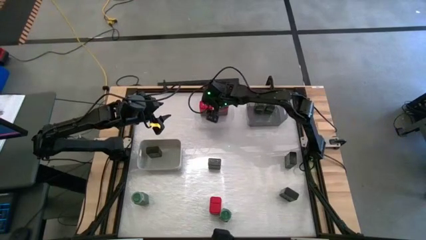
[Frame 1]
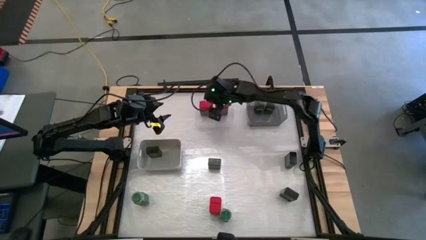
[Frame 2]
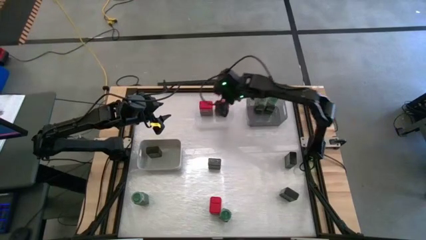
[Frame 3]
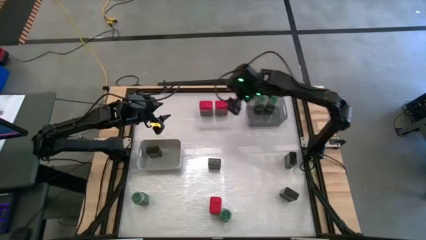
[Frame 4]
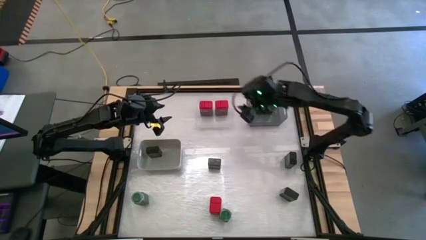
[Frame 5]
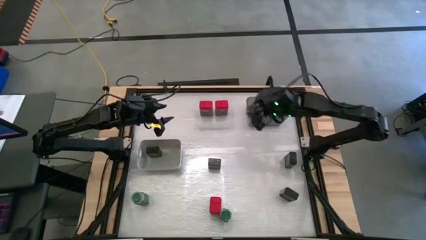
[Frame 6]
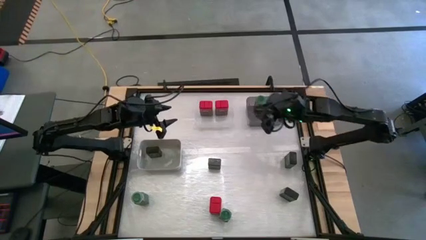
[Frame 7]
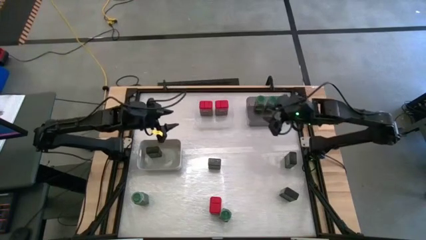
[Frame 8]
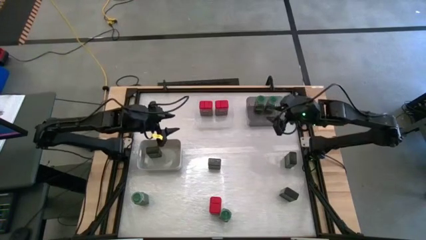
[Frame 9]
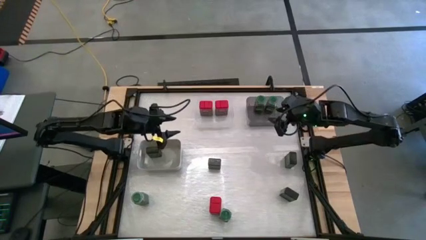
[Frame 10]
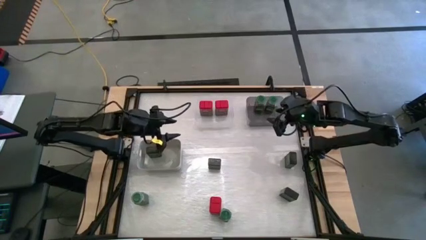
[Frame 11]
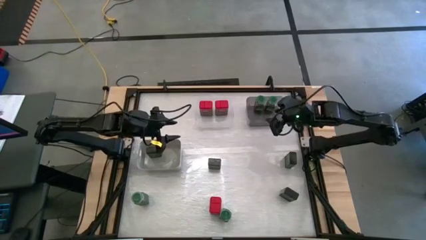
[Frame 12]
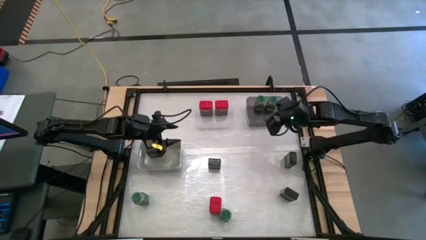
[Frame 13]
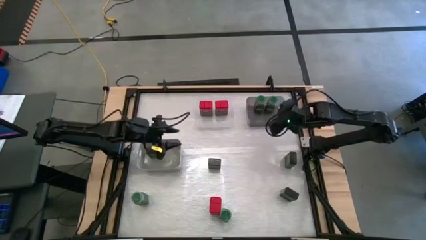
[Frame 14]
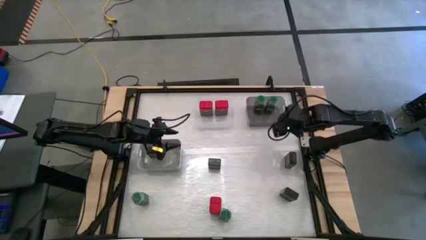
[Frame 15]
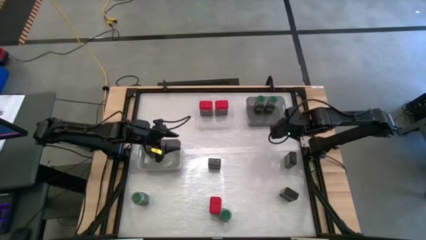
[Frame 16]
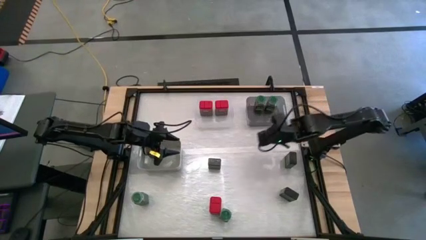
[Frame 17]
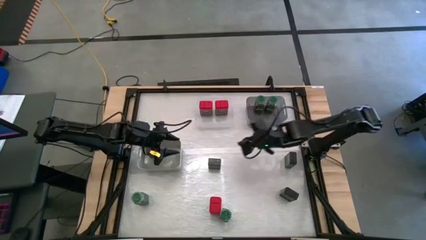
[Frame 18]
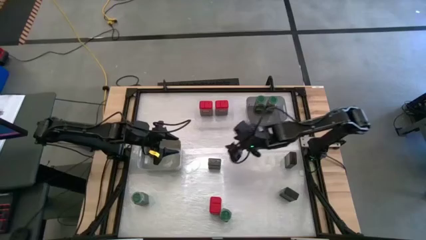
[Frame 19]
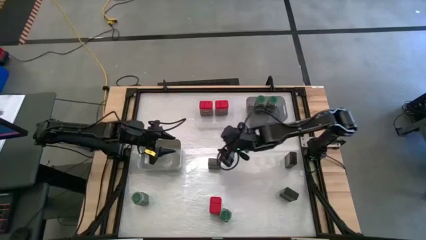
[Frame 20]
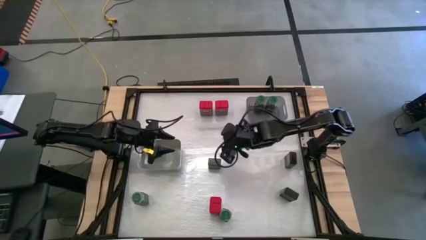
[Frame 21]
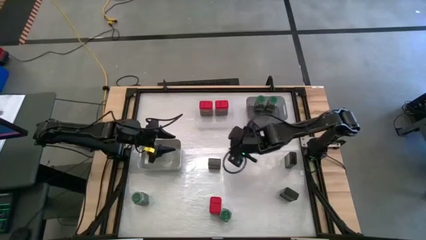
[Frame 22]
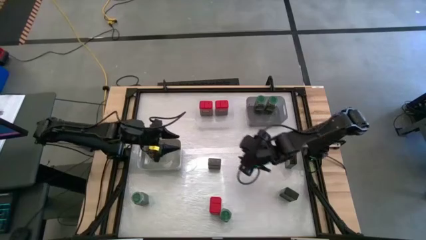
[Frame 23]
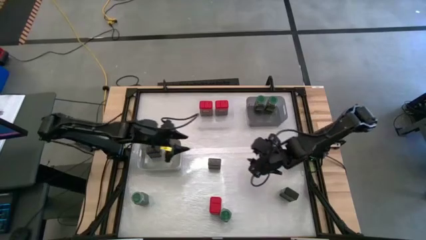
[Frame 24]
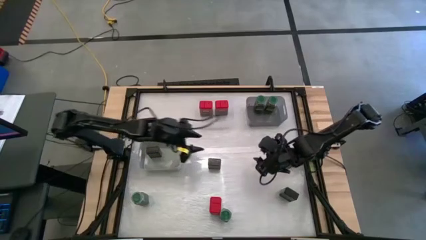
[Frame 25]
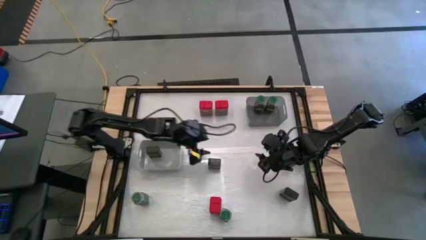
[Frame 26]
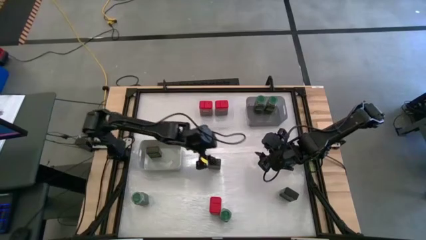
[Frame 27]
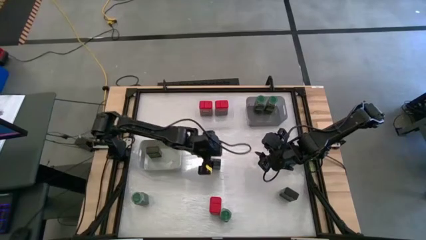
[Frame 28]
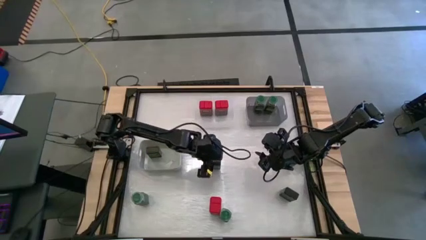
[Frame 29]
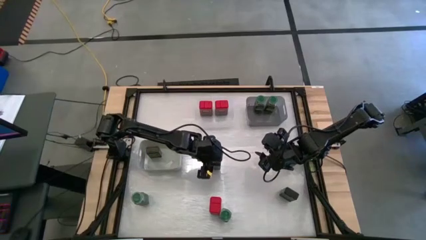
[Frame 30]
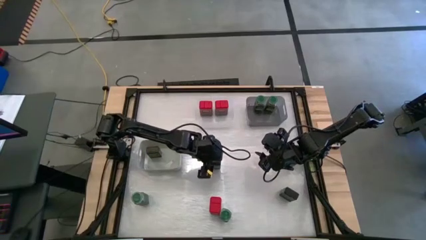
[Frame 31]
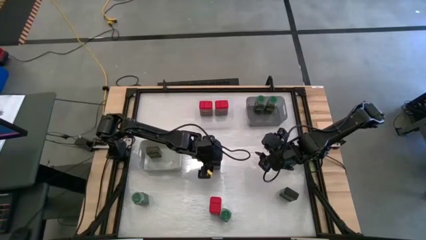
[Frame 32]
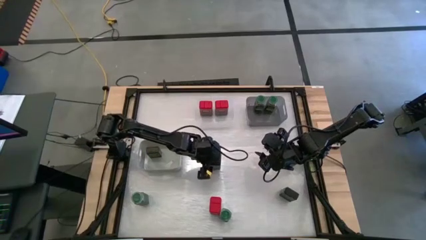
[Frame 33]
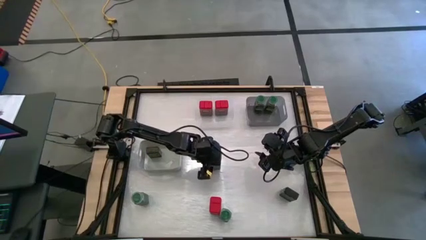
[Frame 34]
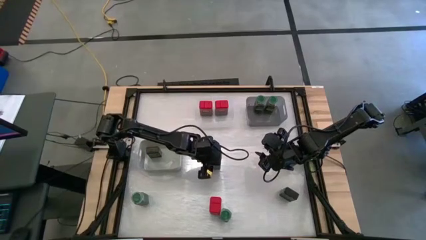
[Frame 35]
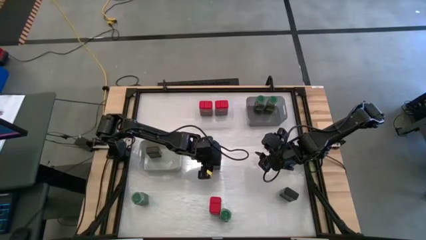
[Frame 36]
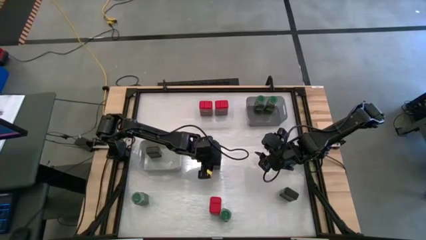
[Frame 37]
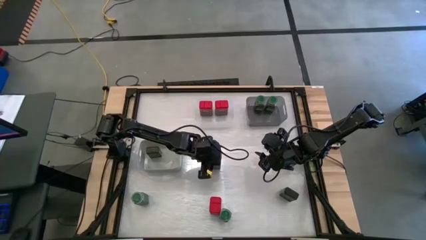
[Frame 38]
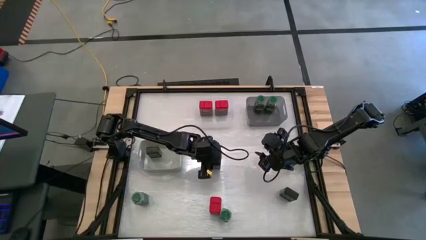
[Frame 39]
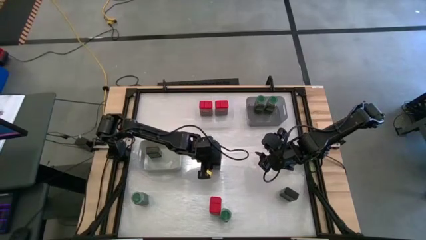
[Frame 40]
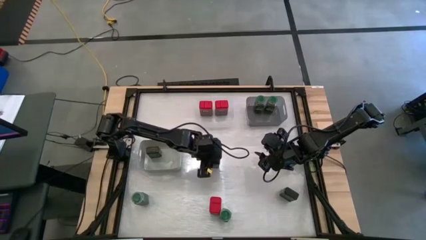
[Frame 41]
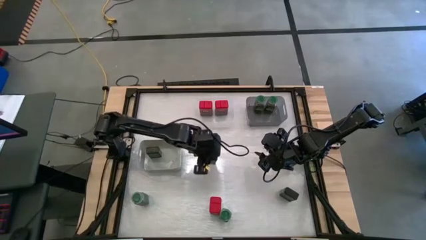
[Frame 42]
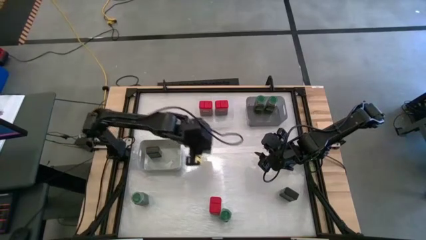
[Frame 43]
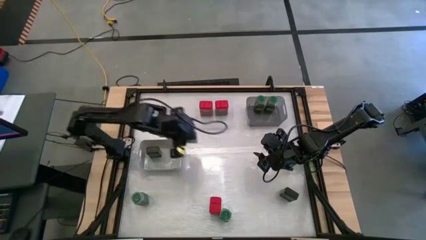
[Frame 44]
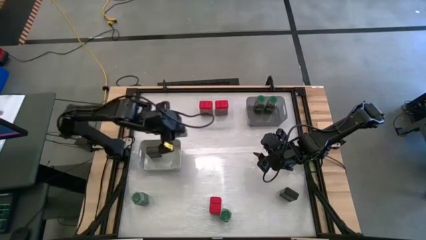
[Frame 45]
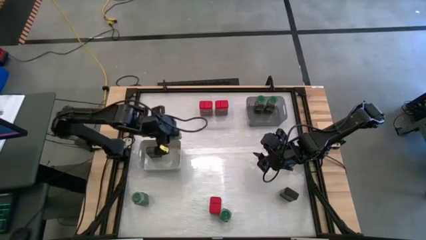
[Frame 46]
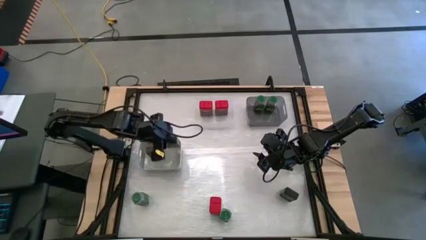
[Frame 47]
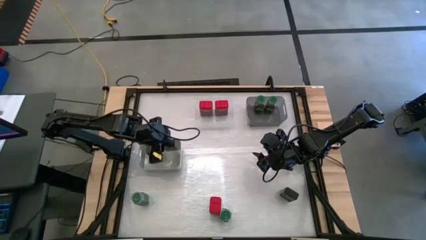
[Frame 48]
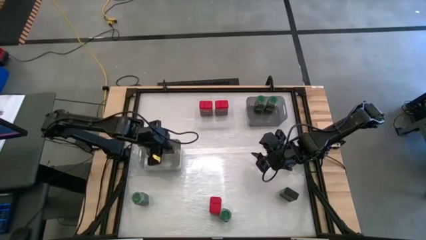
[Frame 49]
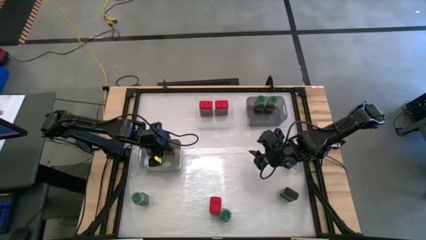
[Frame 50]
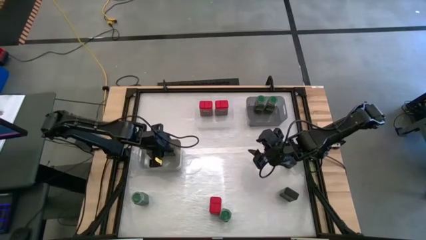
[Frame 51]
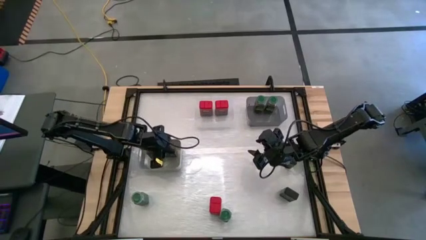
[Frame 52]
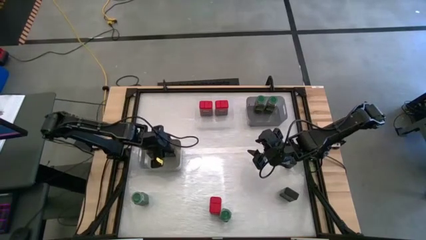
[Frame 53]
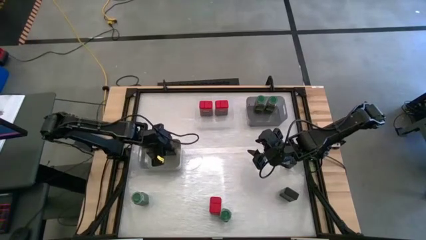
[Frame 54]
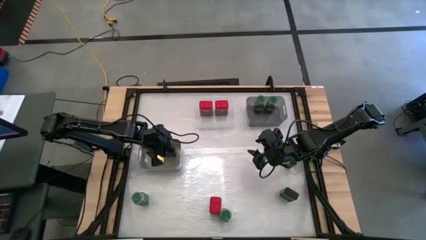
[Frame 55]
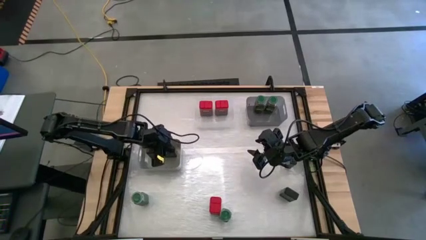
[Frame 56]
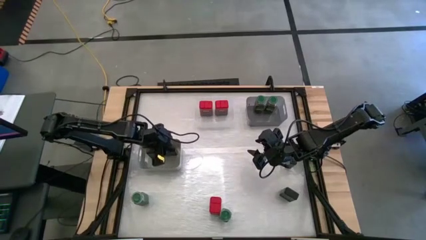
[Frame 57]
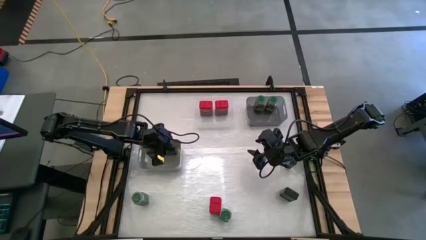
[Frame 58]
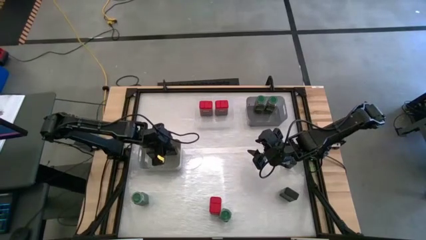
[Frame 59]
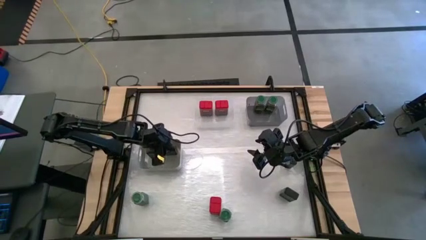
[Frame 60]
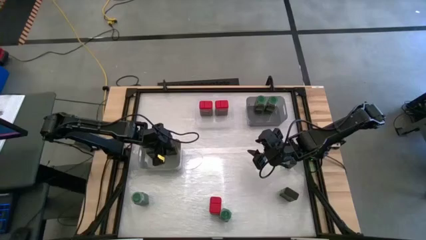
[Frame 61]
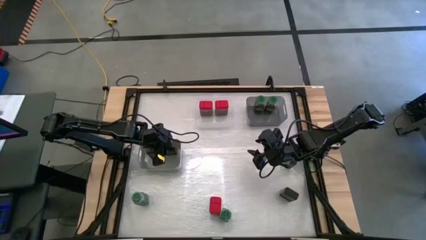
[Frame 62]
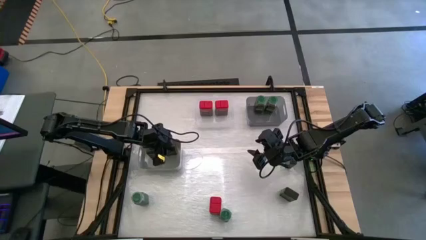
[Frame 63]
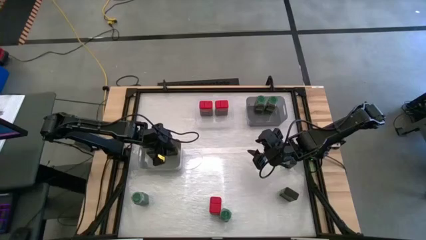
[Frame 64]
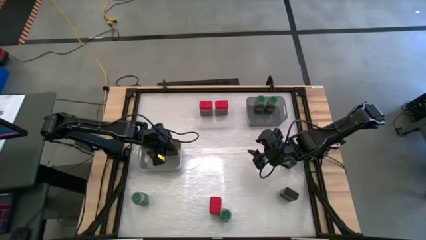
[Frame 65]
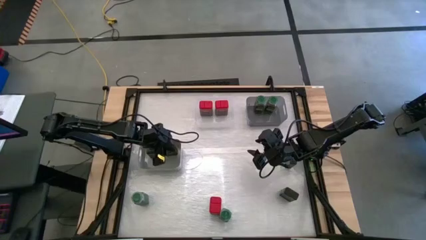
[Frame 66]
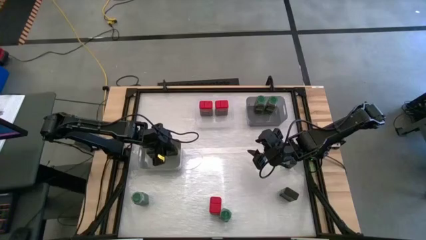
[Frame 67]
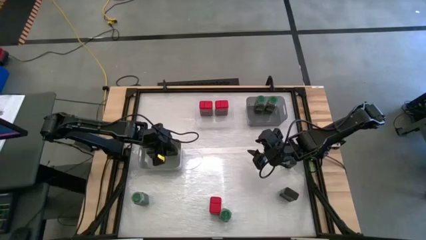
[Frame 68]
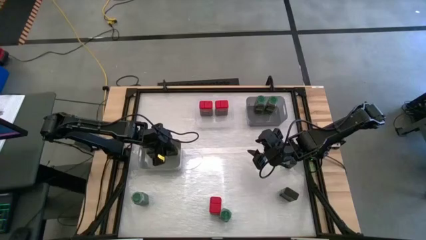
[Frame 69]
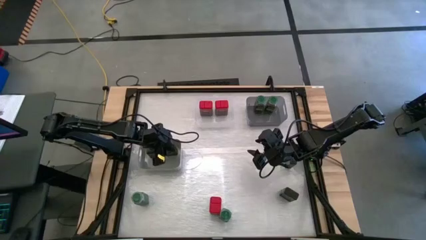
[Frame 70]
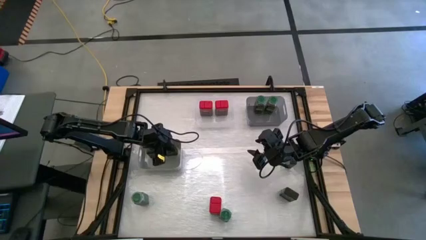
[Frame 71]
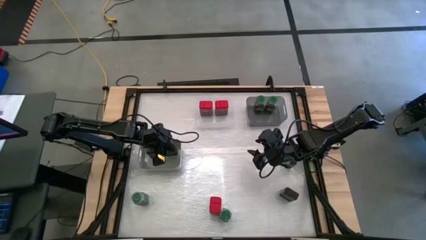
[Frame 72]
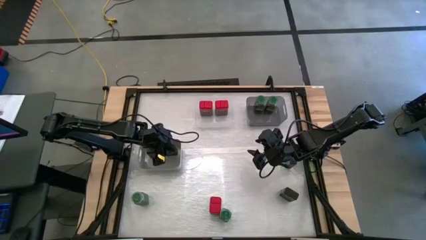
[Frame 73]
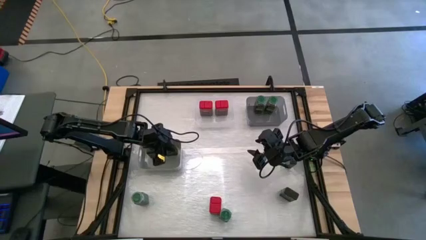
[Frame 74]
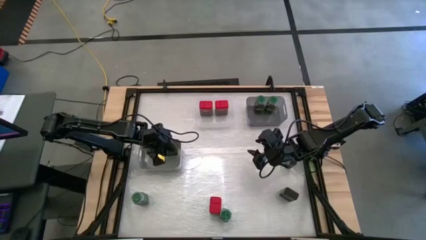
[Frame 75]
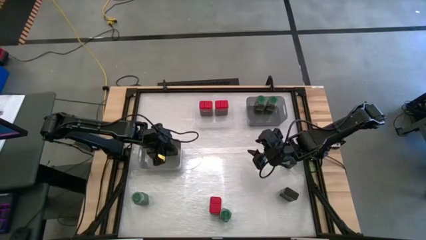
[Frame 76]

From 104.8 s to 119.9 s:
Task: Sort spices by type
Put the black seasoning bottle into the gray bin

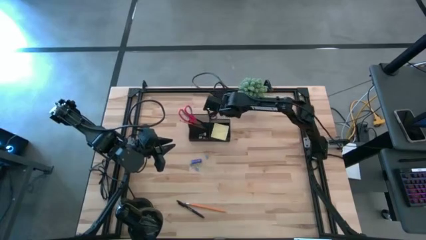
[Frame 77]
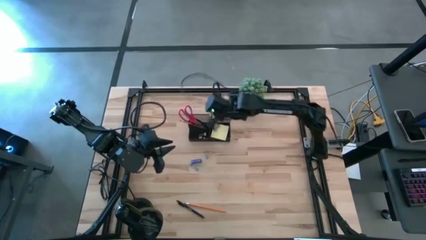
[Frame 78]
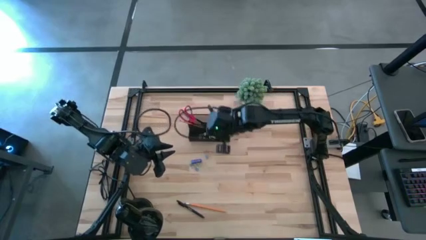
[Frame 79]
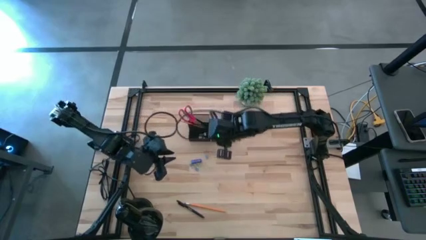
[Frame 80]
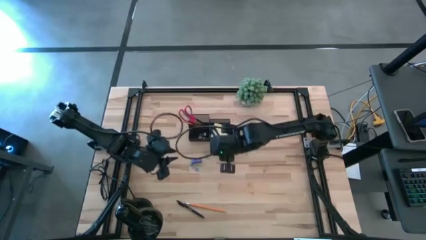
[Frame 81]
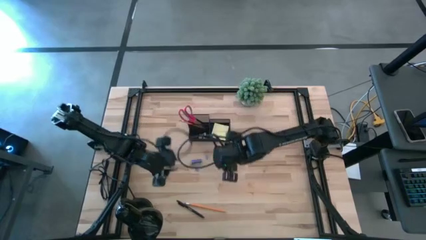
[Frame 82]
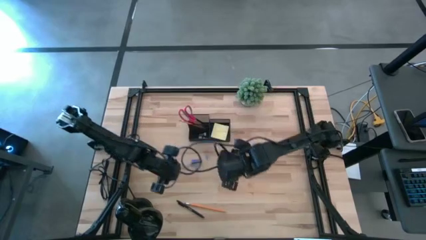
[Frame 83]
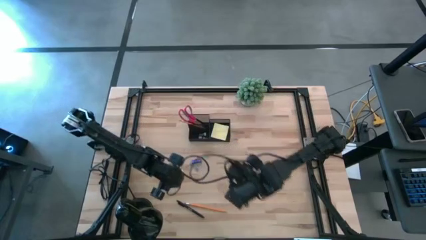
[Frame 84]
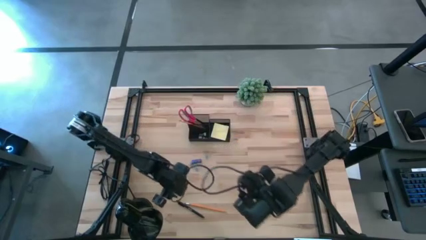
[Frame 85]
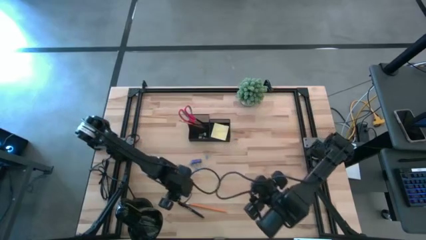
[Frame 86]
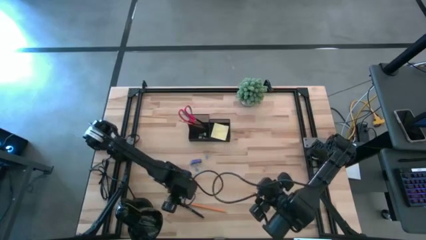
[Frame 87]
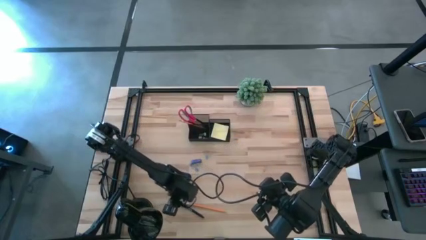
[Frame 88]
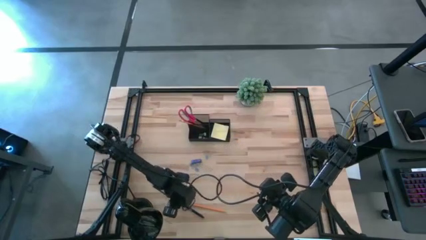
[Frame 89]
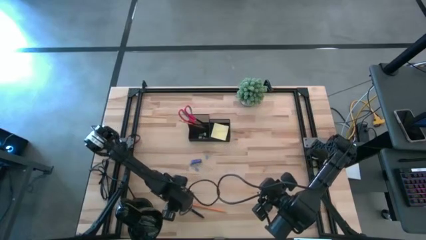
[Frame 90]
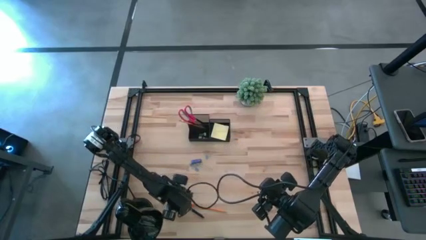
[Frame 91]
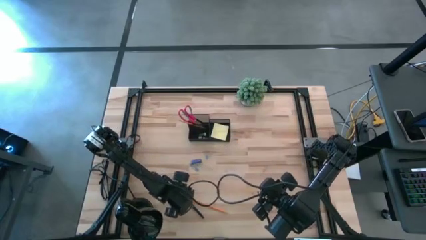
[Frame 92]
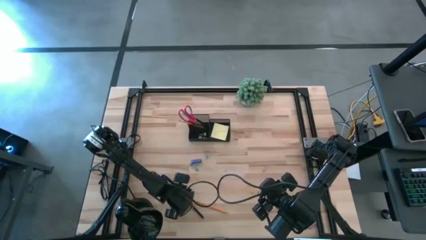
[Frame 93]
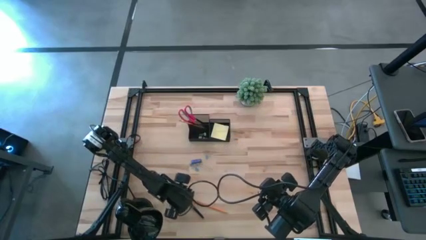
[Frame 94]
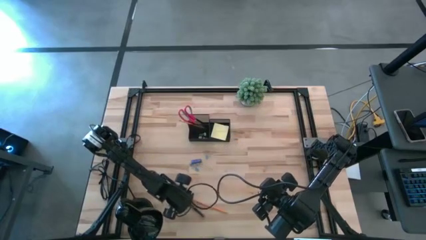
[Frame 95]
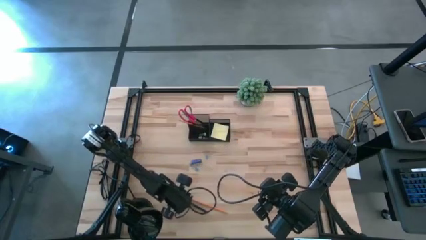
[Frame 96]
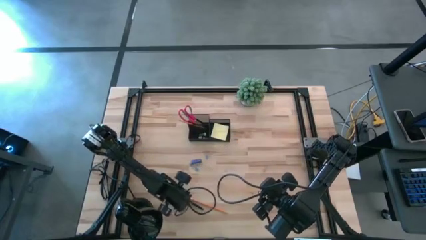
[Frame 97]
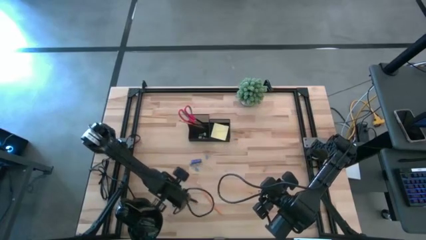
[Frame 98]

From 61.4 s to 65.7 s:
Task: Pick and place office supplies into organizer
Put the black pen into the desk organizer
